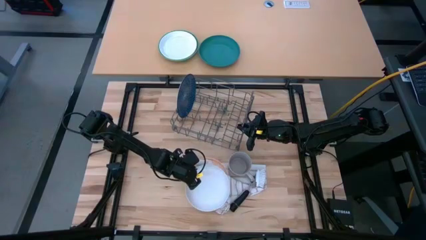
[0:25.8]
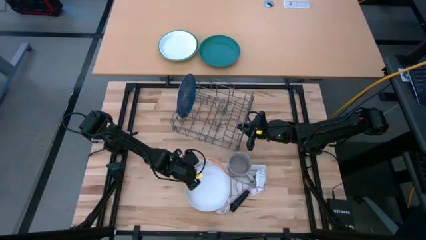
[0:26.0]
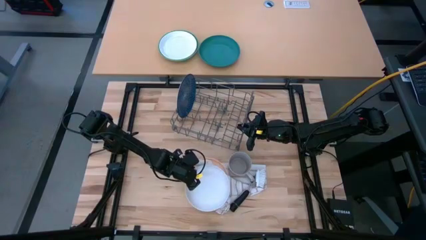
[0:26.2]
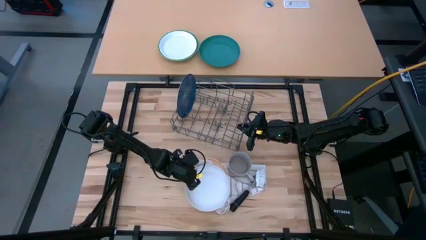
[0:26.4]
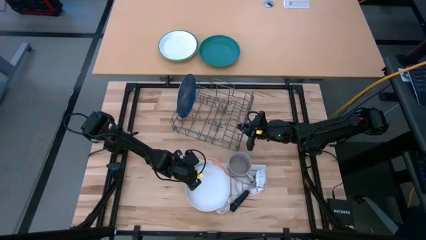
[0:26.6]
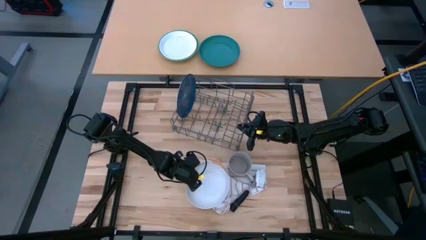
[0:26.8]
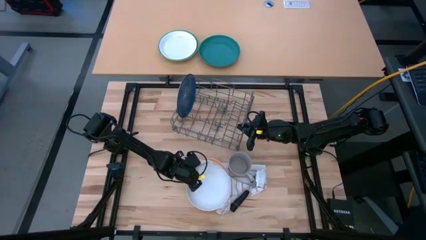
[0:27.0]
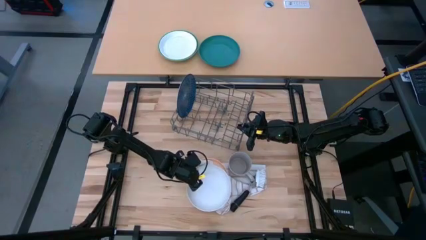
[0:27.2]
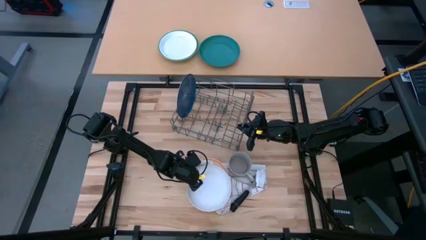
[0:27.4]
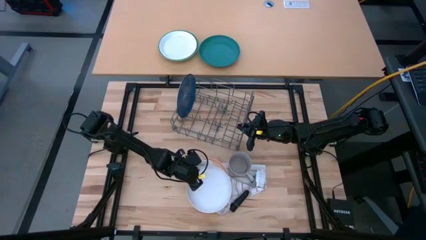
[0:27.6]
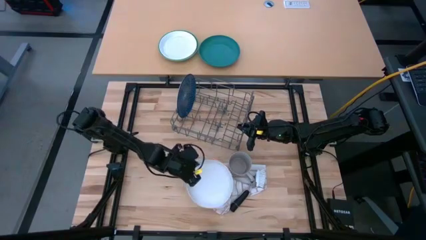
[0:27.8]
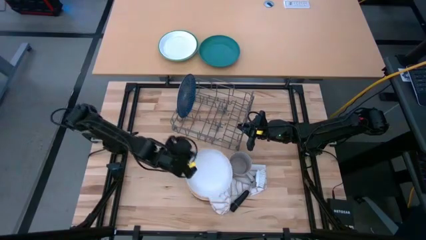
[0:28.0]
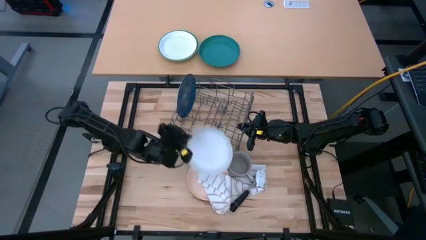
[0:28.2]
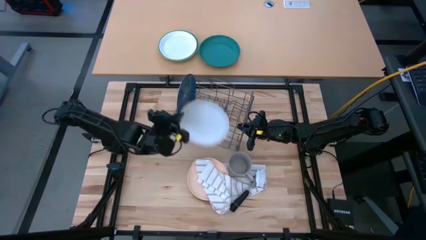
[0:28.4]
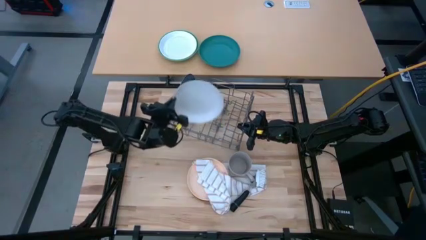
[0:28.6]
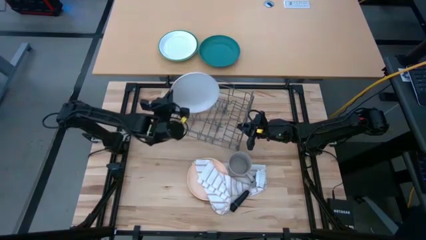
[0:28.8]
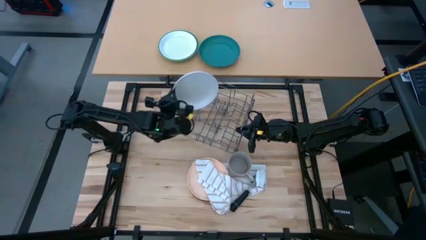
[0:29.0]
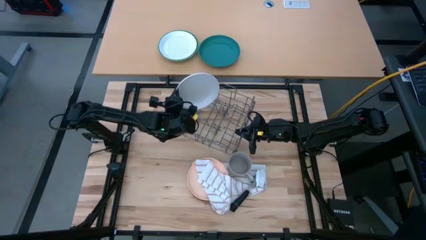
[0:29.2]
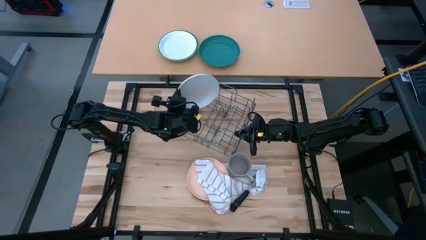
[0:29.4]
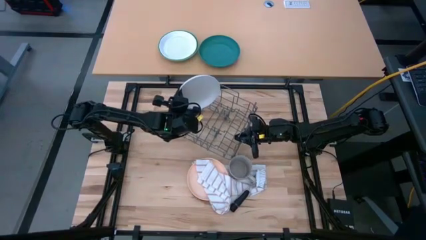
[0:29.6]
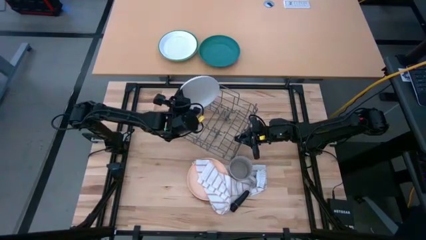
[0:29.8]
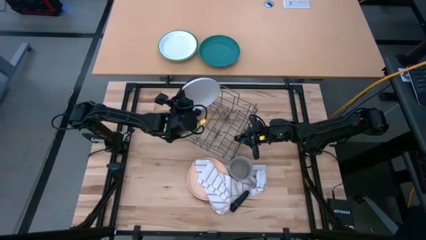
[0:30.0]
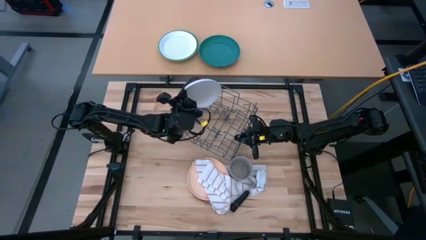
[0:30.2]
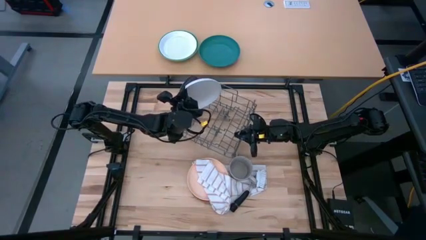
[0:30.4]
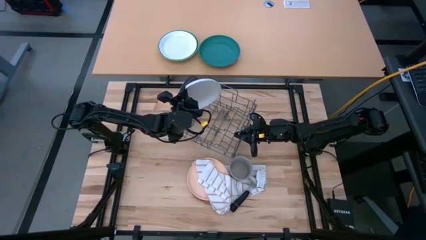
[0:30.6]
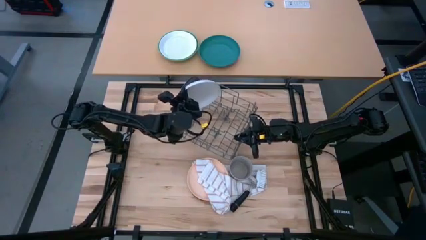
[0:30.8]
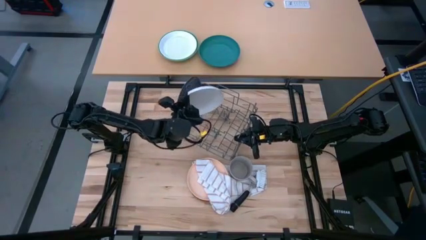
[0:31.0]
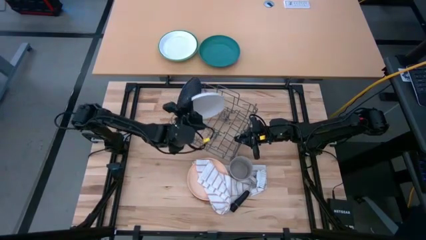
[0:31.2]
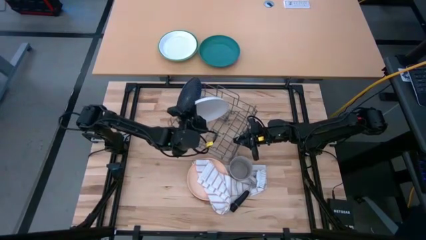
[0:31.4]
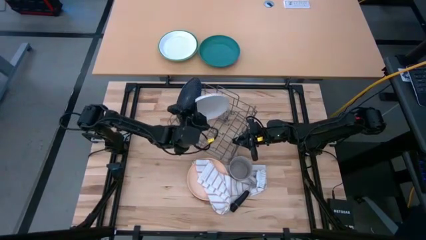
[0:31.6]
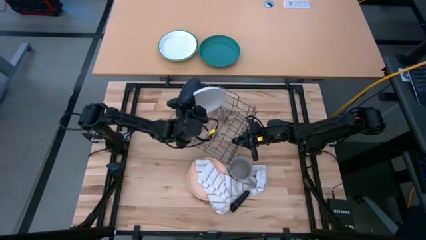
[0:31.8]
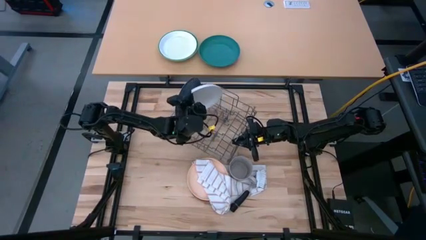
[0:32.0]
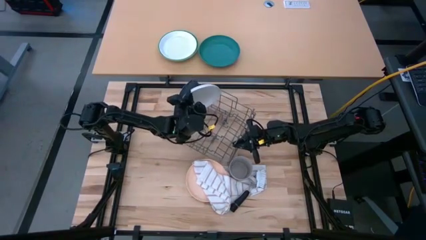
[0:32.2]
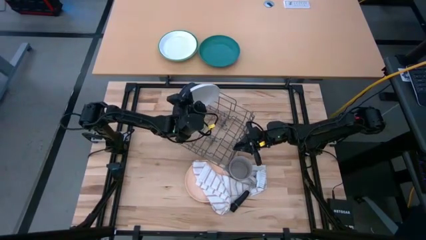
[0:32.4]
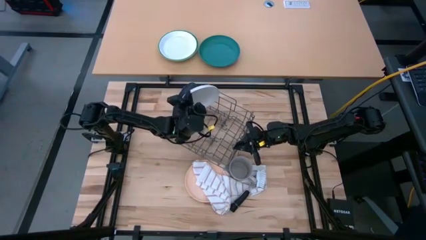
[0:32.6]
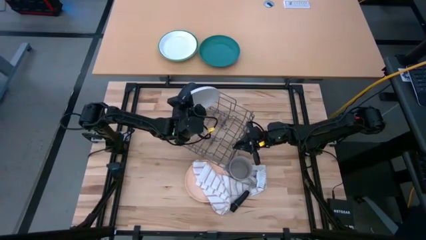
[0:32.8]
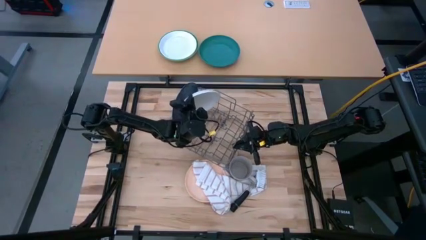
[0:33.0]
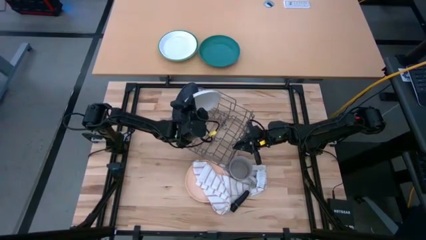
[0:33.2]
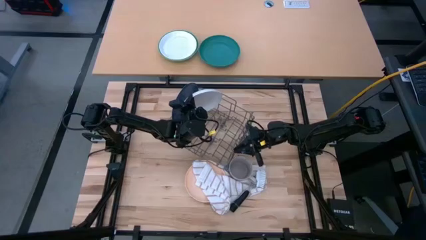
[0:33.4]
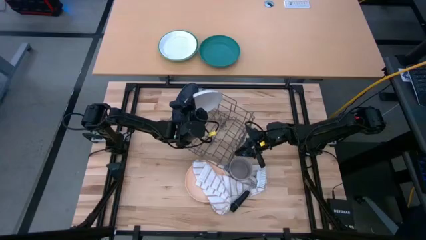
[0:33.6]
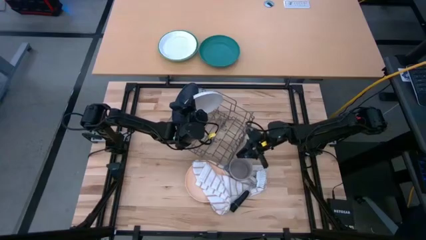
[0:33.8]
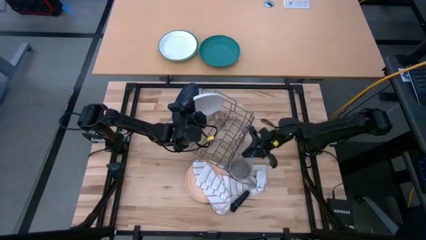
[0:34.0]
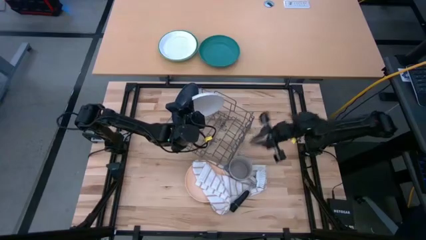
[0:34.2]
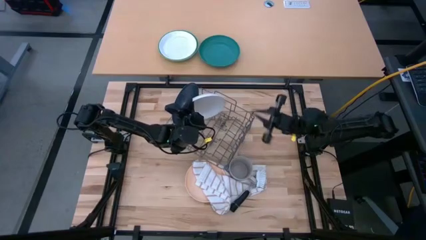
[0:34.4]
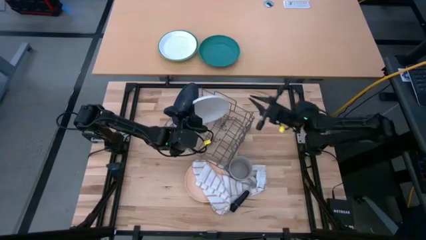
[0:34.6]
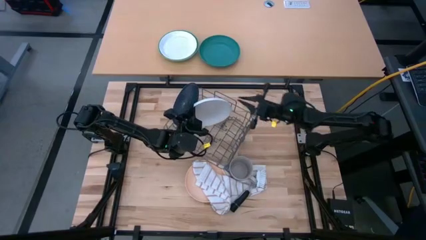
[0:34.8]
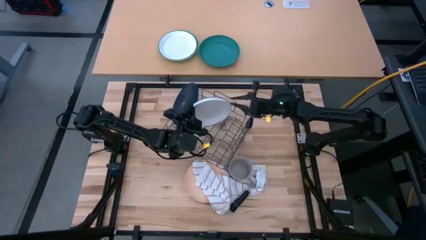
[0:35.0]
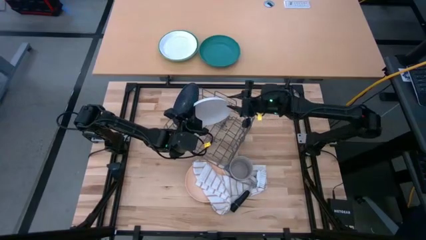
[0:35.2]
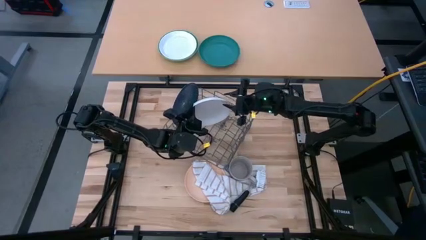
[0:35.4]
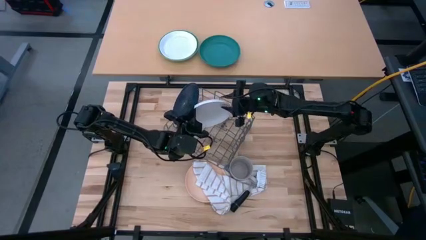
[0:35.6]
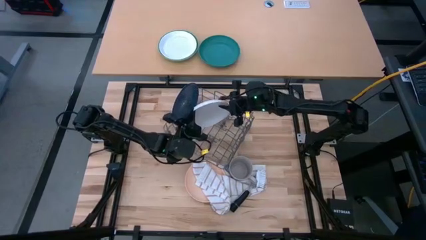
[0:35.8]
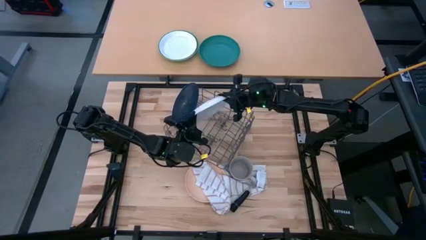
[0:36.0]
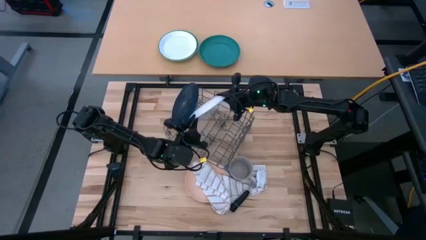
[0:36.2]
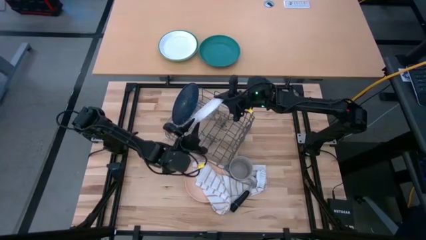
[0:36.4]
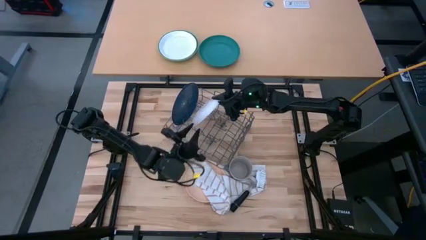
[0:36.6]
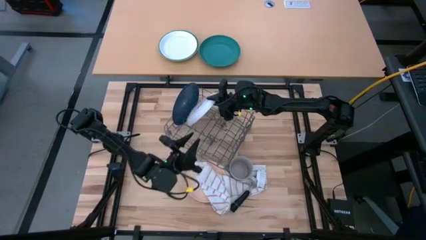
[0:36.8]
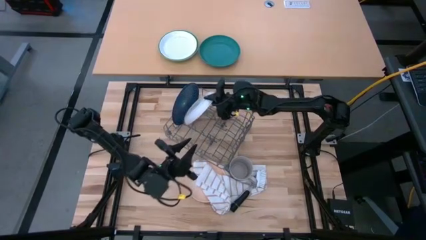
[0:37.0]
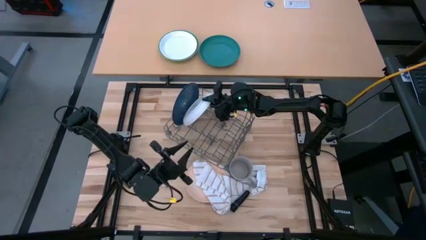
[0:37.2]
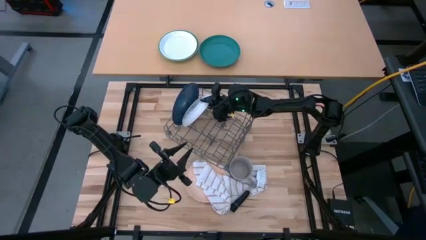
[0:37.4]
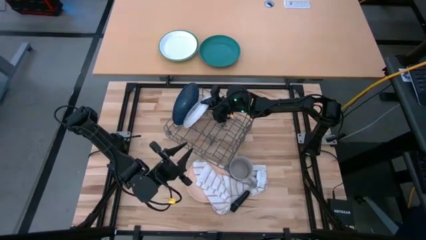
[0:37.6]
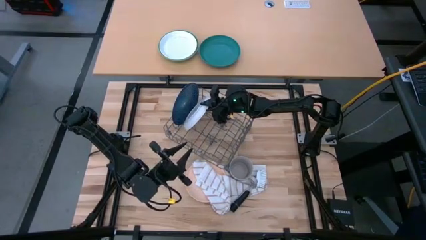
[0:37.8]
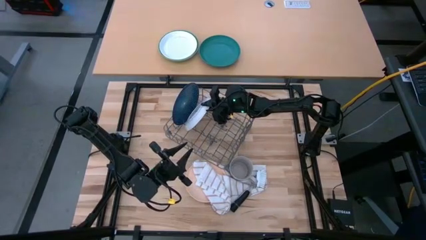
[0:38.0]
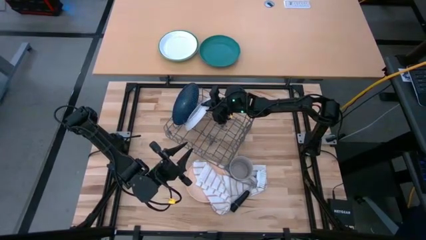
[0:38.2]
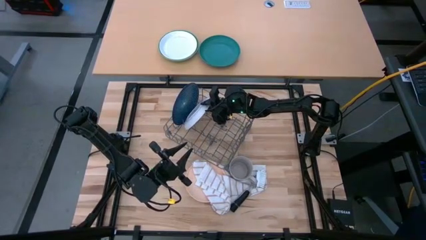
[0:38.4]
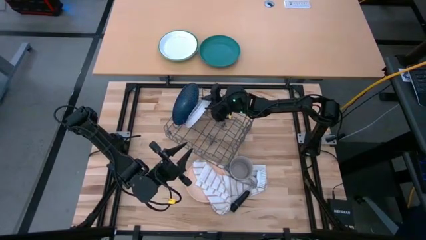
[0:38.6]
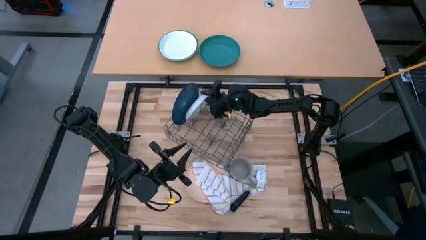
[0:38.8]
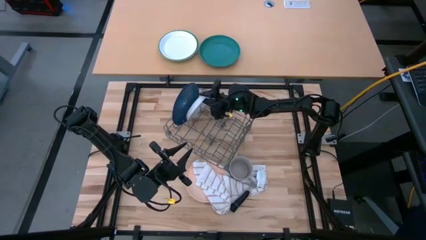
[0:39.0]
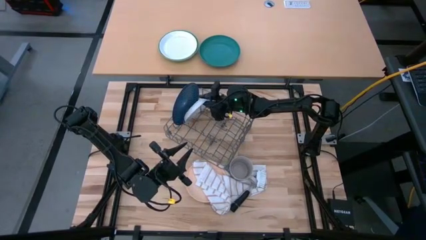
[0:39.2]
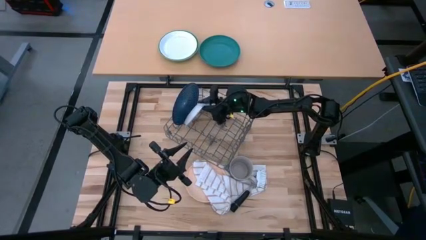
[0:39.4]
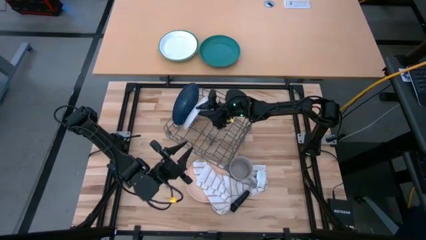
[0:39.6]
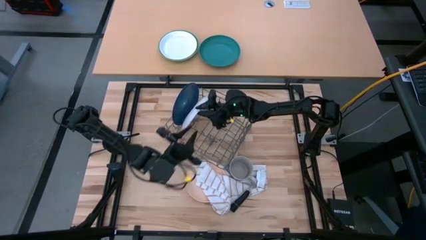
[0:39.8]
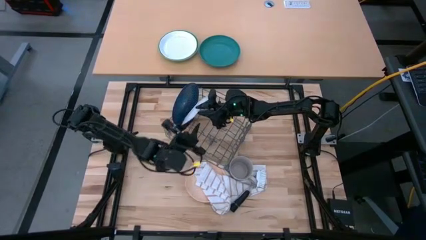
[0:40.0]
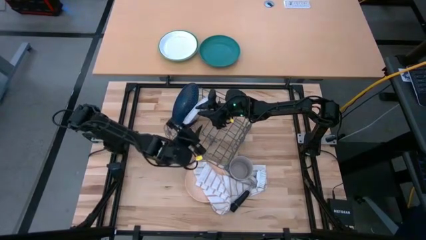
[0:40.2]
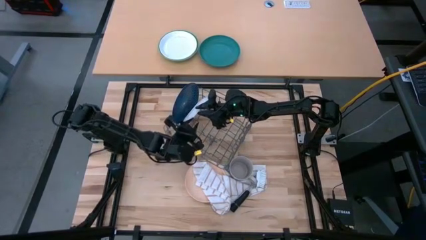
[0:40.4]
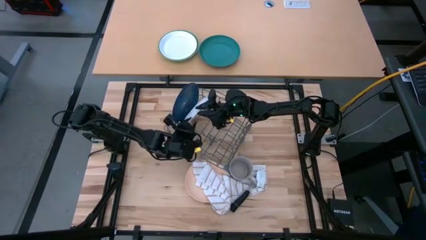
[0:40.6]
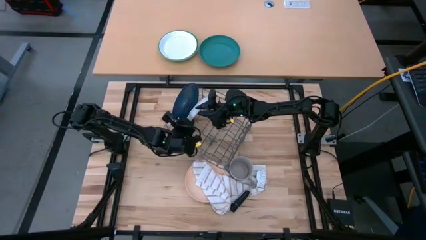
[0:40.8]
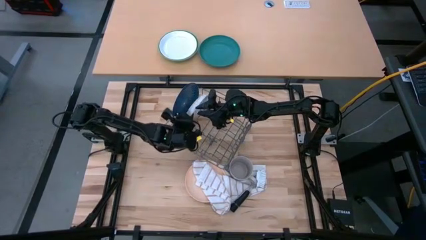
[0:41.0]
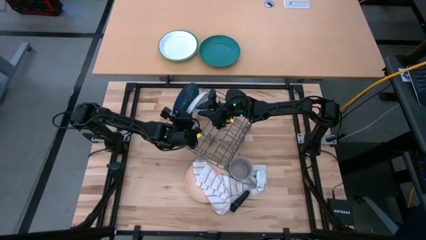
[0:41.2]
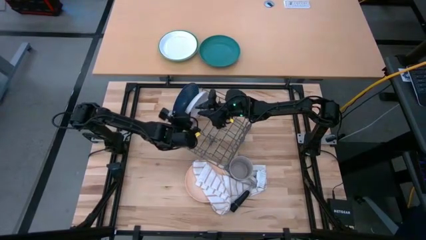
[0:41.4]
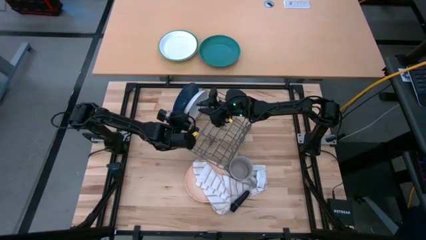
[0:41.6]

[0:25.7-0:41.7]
Task: Sort dishes
Put the white plate into the dish rack
